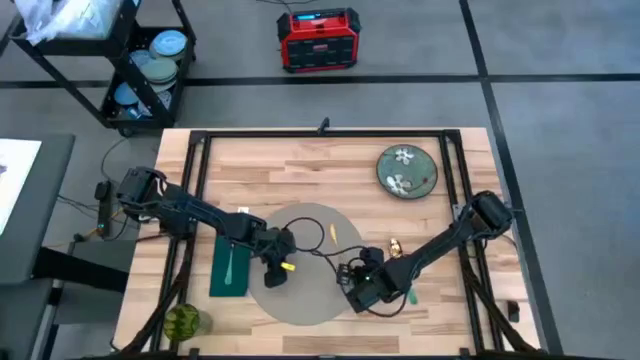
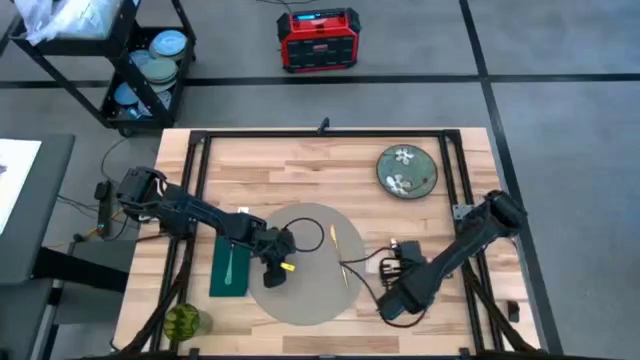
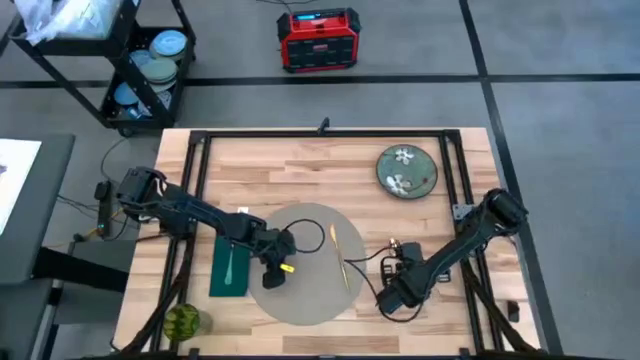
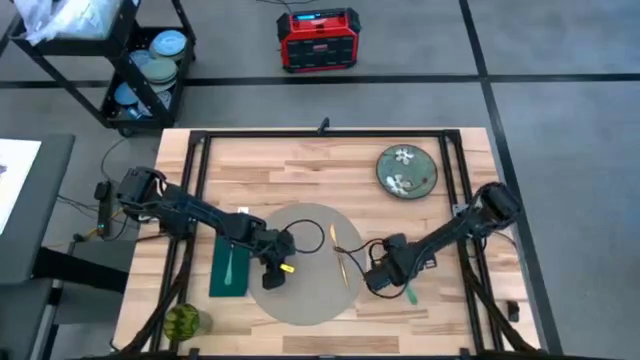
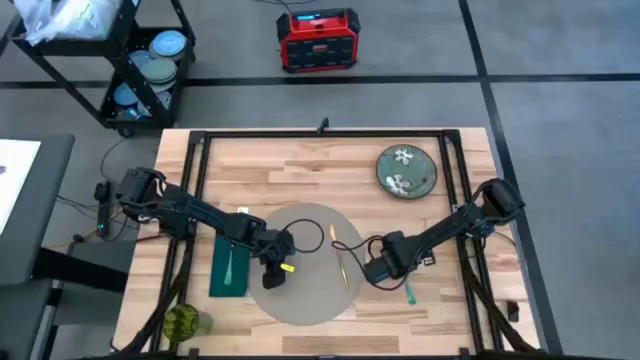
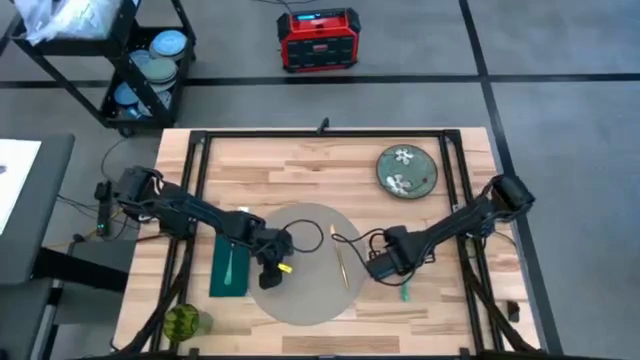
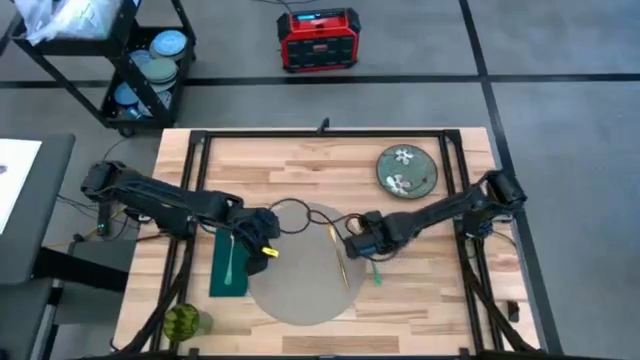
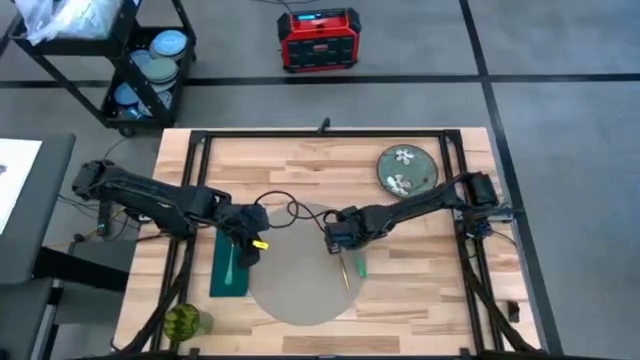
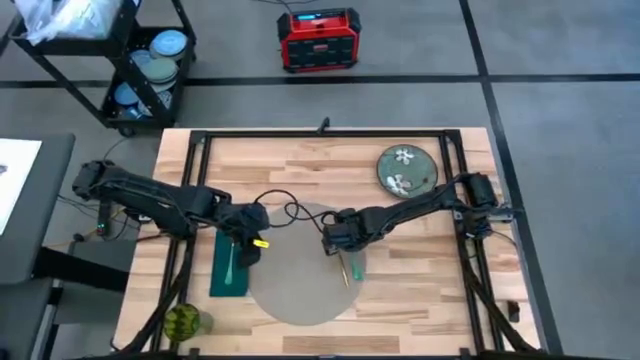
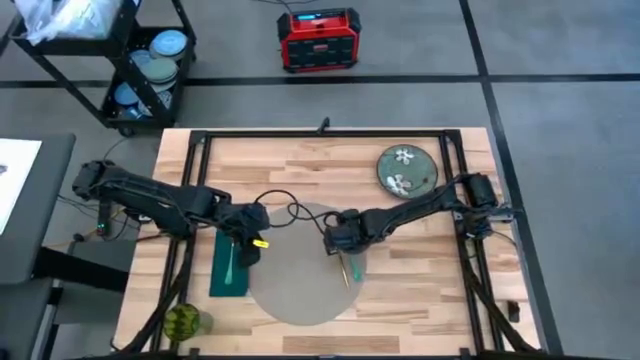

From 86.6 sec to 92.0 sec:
Task: Set table place
Put the spoon beside the dinner knife

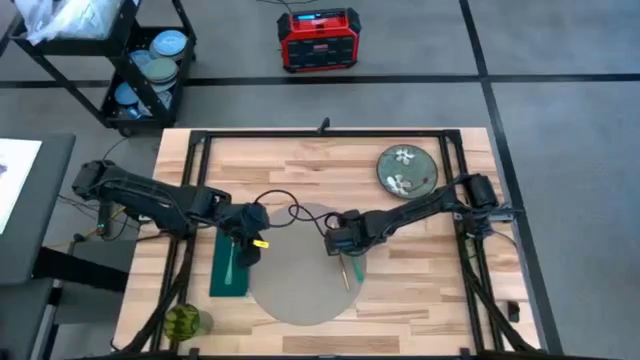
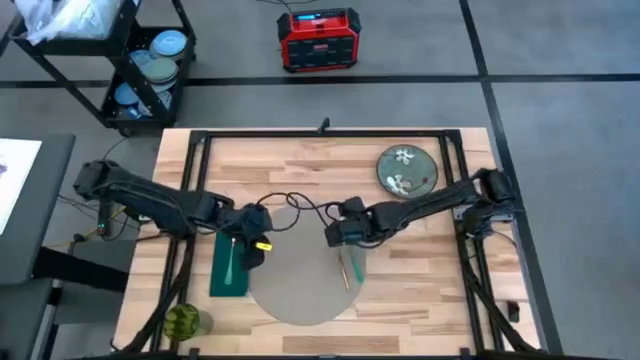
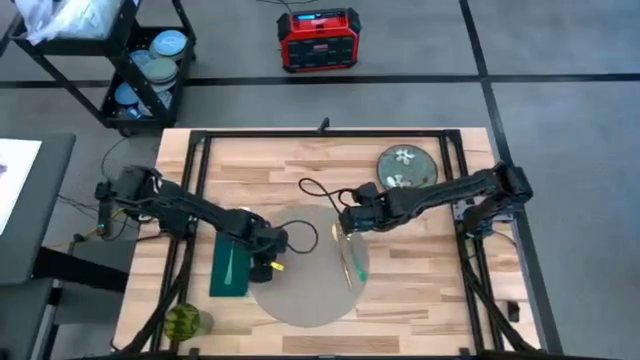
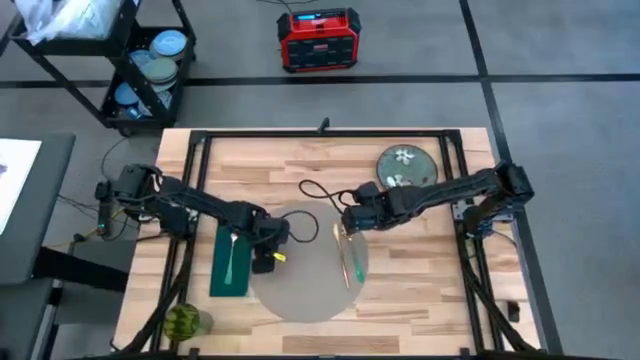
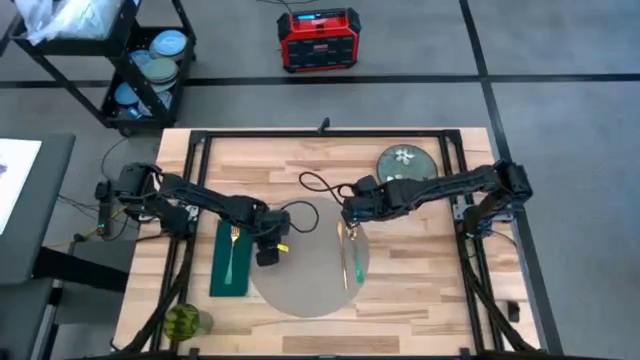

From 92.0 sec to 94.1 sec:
Adjust the gray table placemat

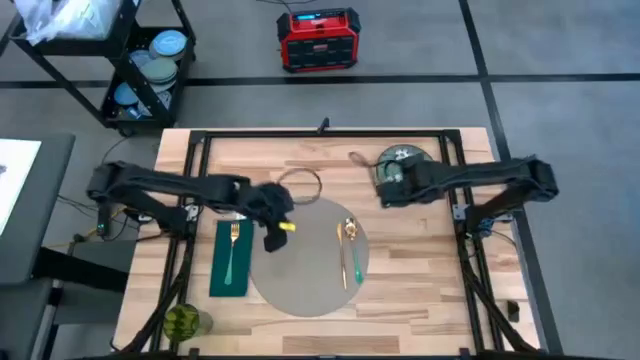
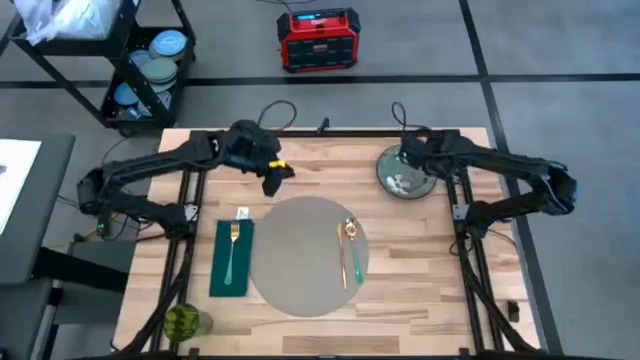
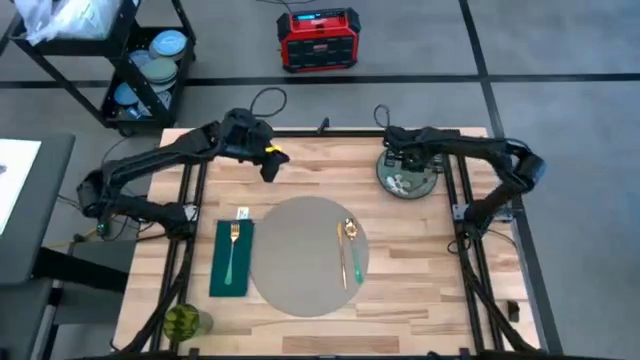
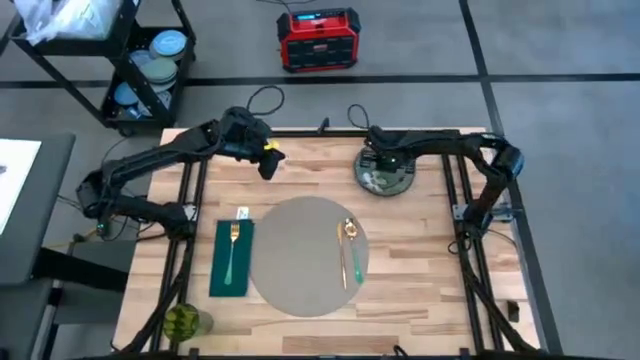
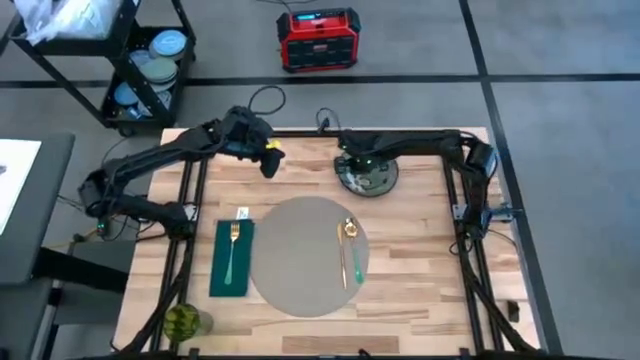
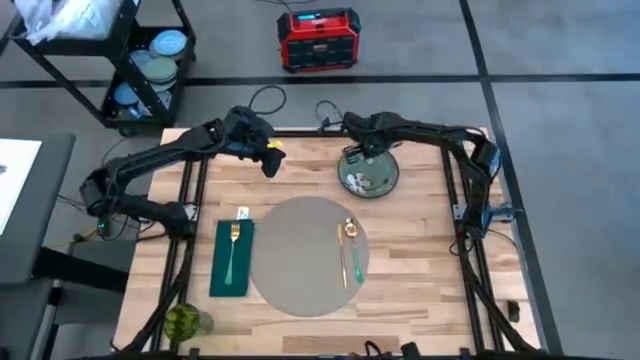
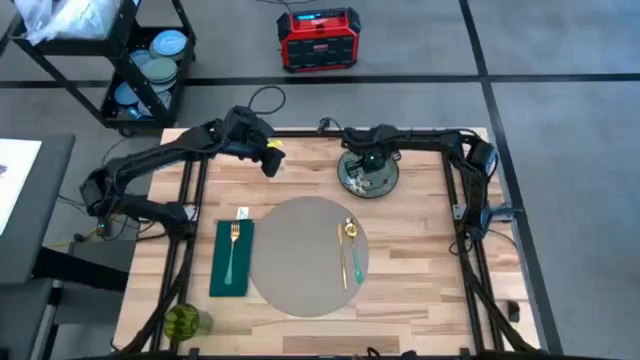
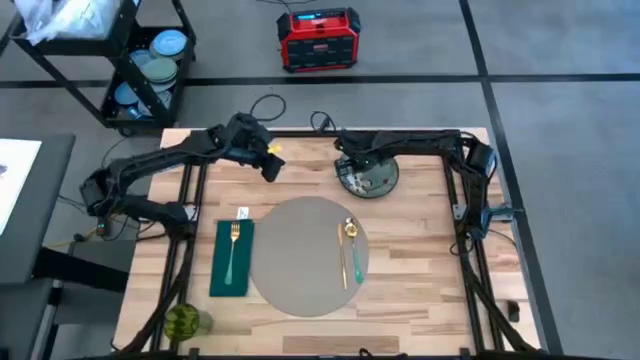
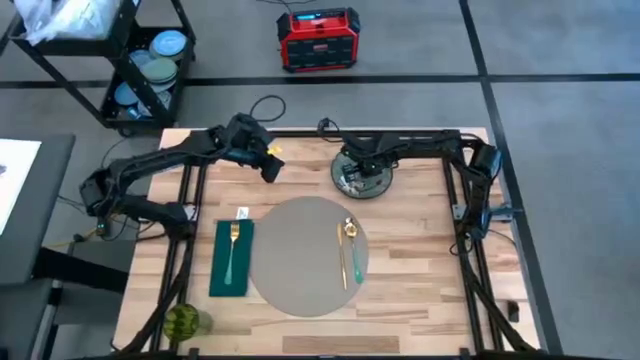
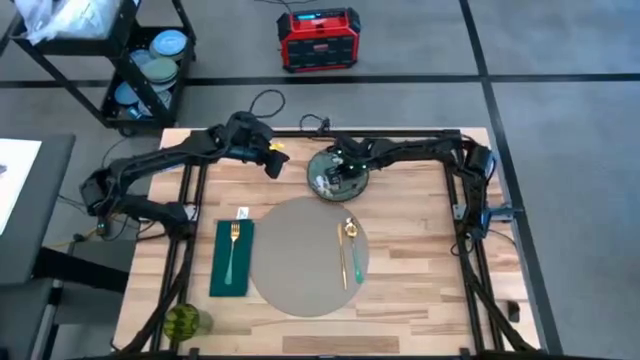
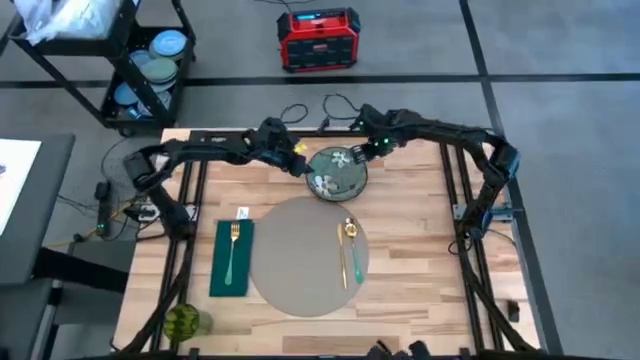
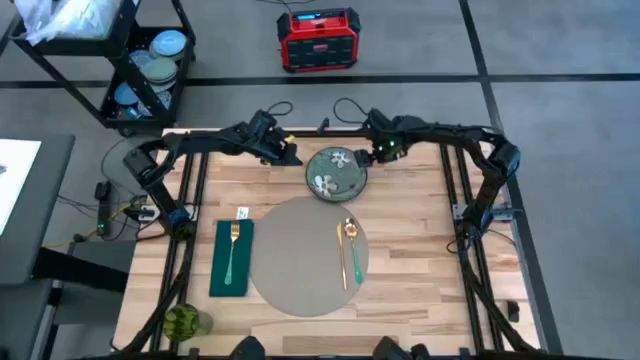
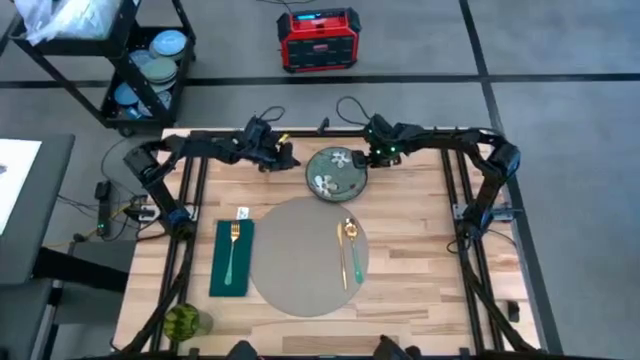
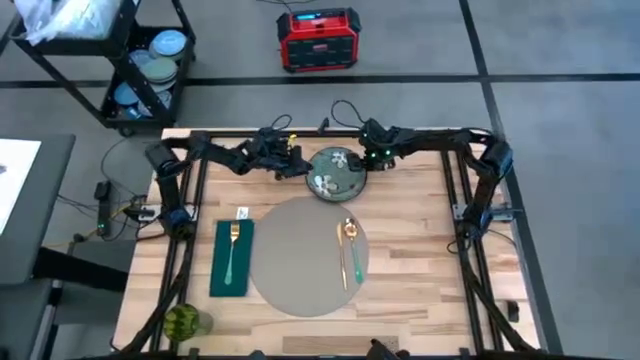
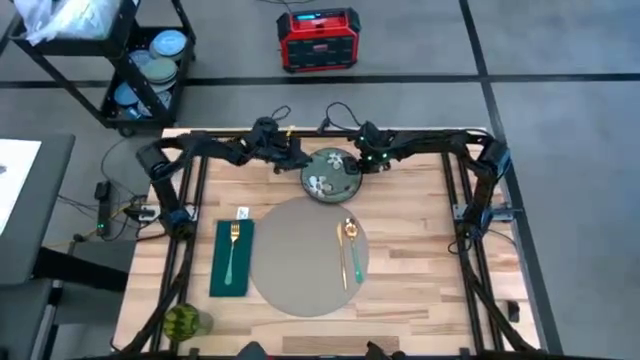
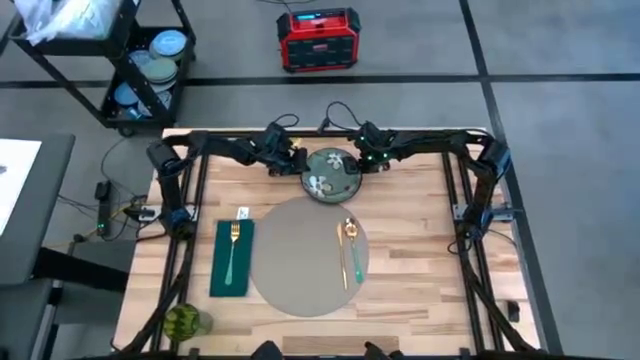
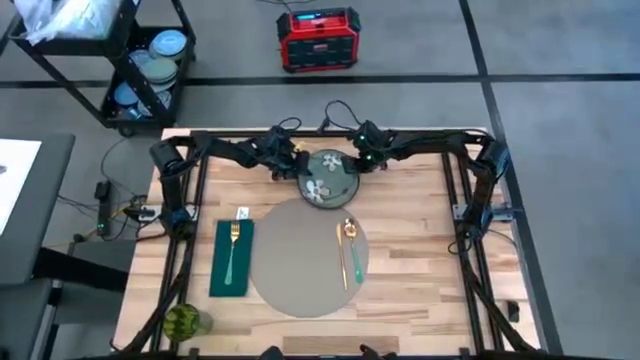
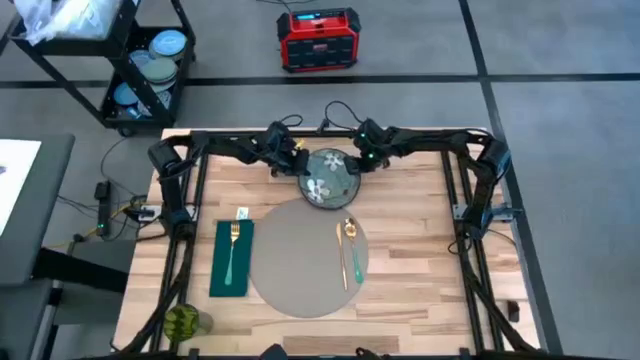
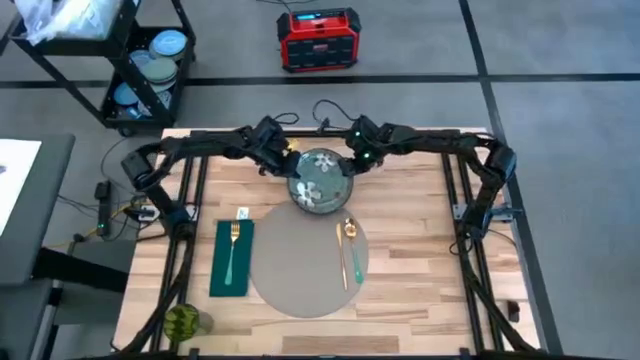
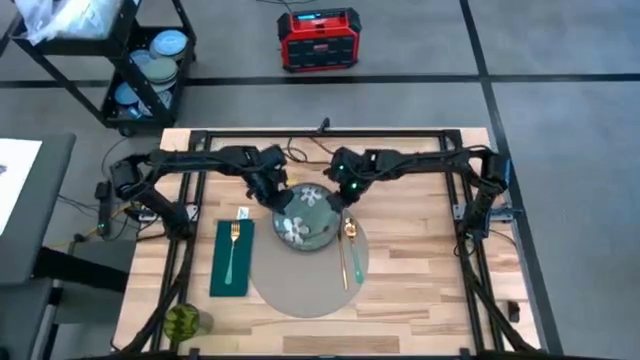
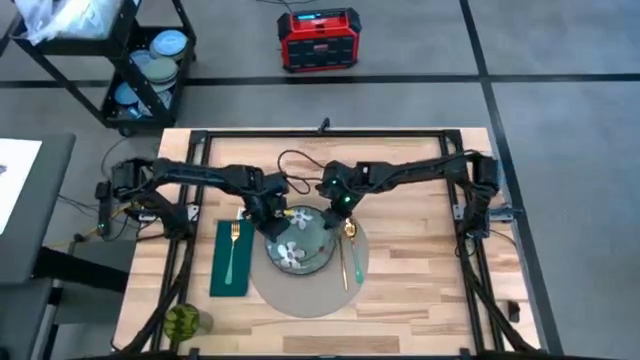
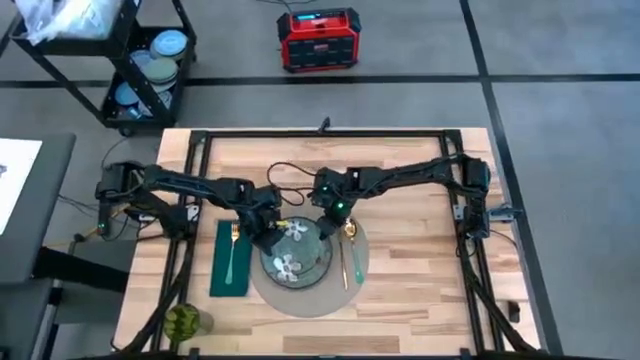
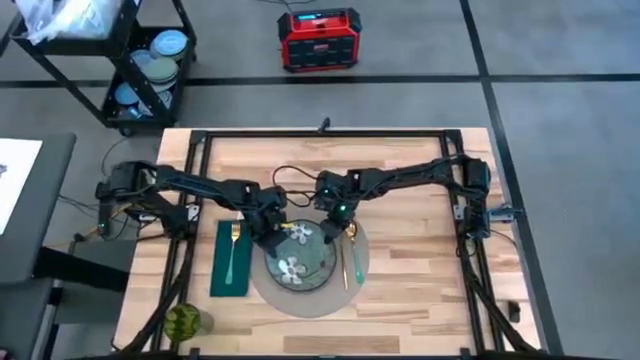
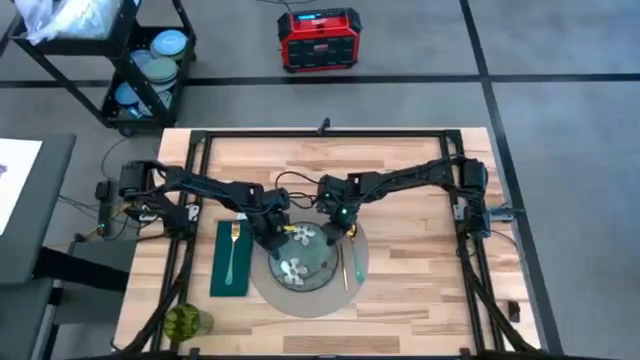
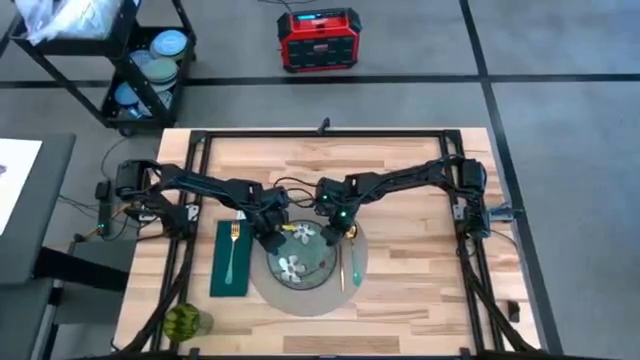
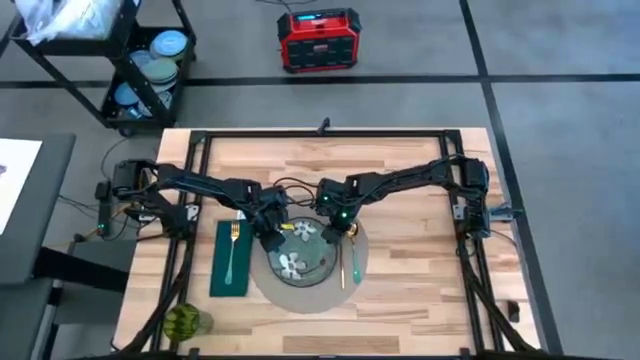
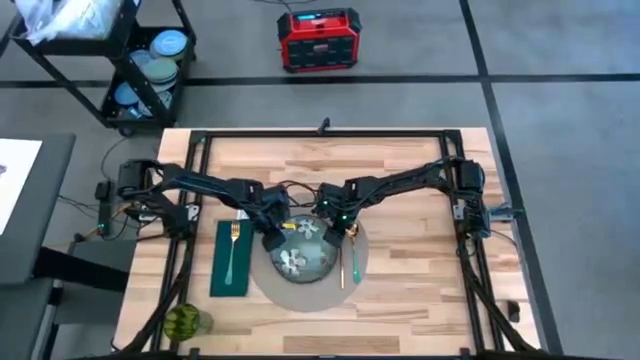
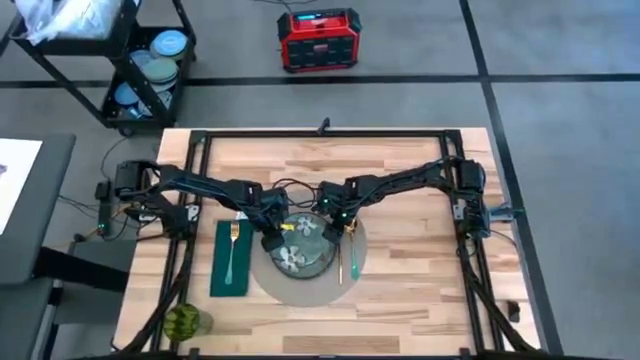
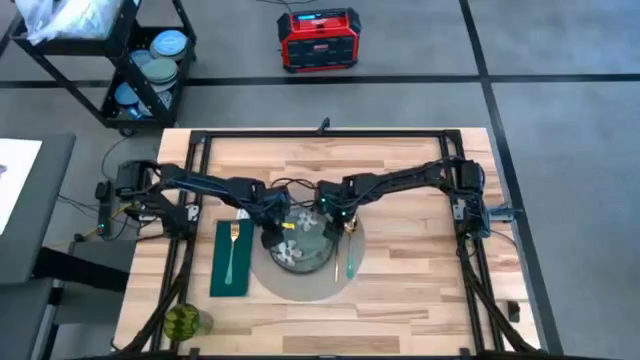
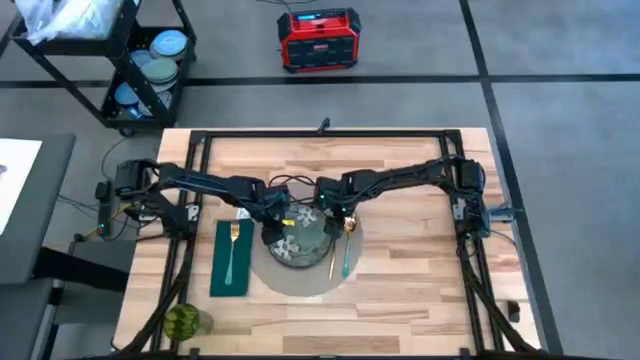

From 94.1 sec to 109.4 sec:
Put the green plate on the gray table placemat
